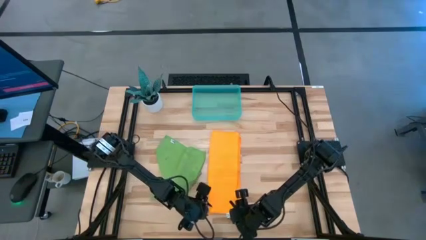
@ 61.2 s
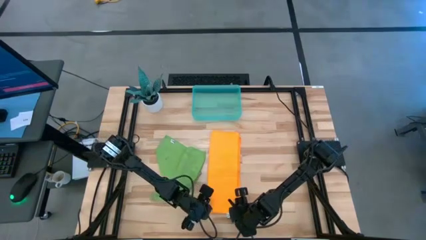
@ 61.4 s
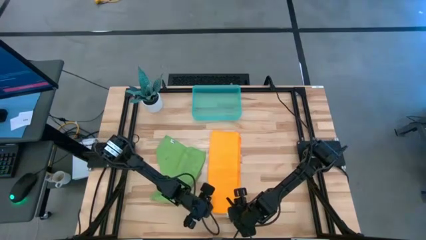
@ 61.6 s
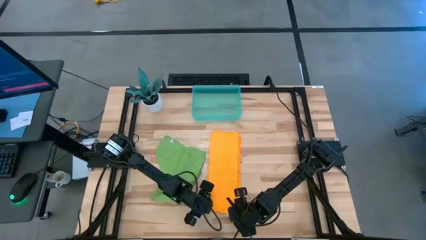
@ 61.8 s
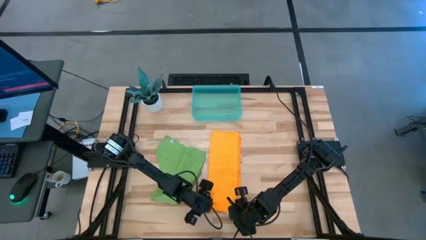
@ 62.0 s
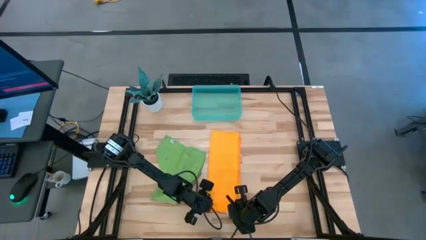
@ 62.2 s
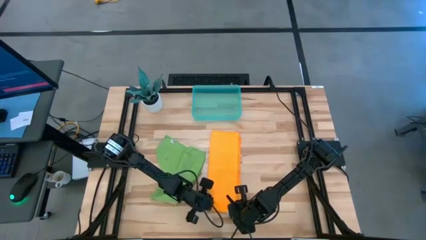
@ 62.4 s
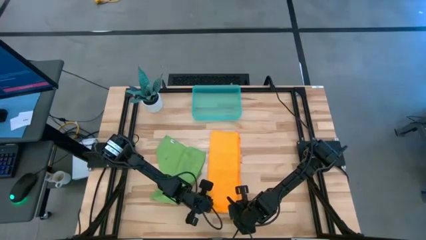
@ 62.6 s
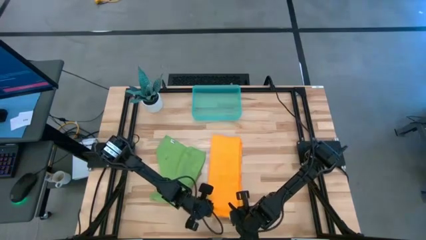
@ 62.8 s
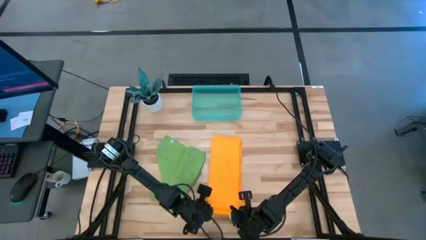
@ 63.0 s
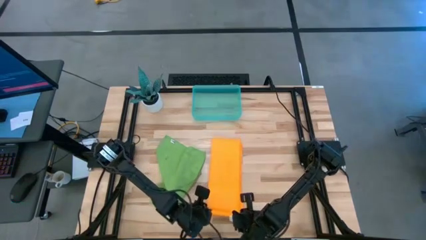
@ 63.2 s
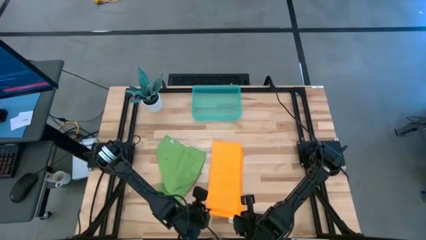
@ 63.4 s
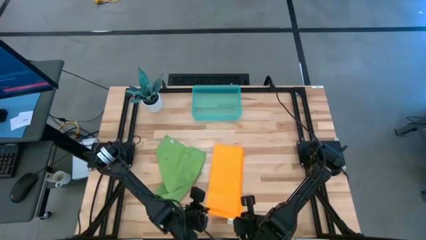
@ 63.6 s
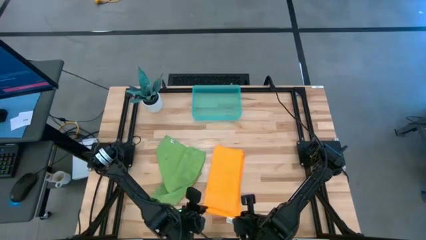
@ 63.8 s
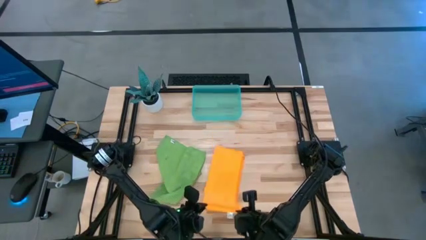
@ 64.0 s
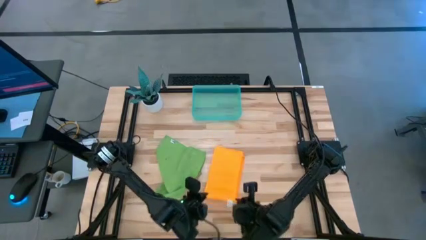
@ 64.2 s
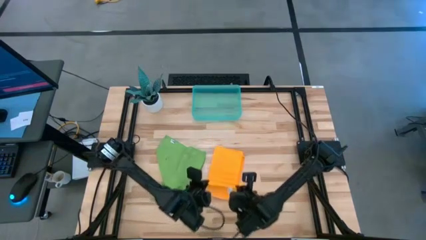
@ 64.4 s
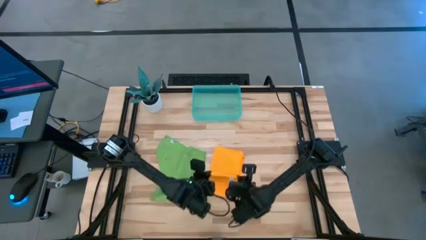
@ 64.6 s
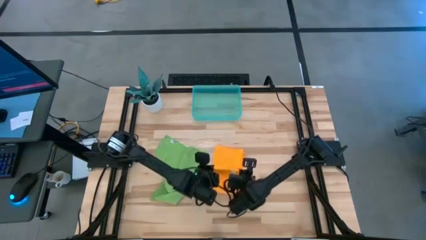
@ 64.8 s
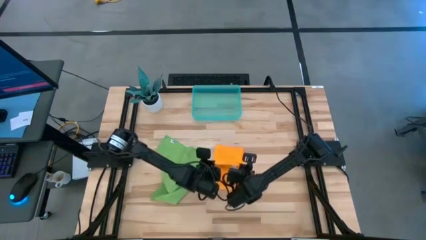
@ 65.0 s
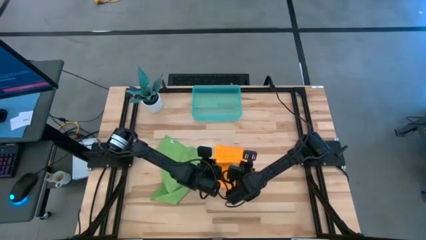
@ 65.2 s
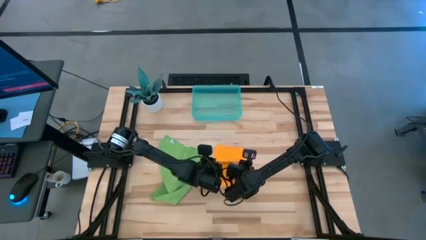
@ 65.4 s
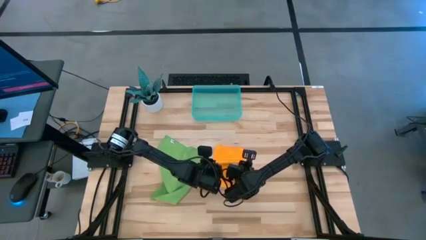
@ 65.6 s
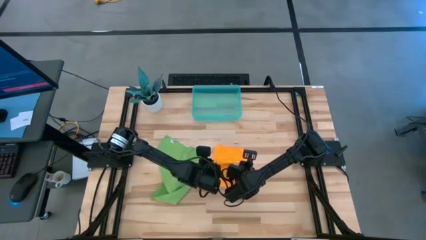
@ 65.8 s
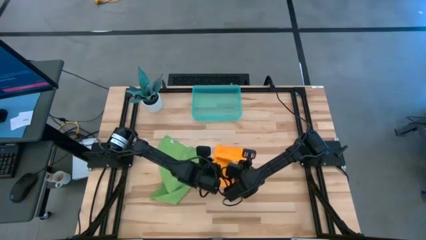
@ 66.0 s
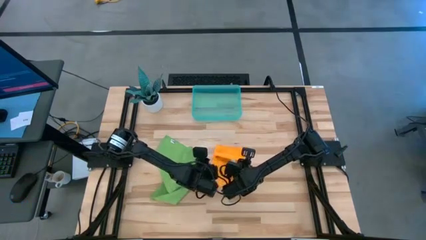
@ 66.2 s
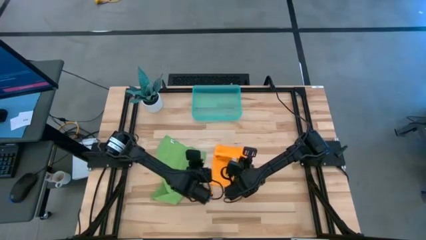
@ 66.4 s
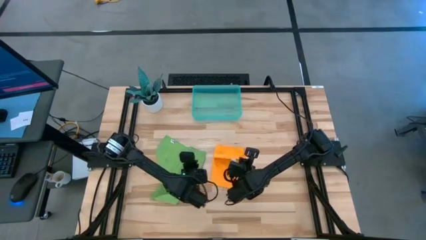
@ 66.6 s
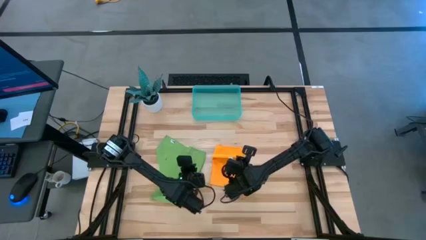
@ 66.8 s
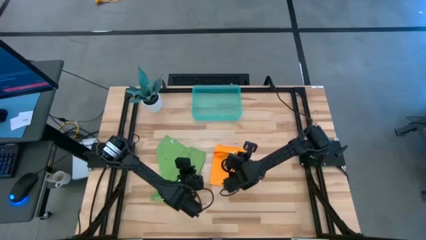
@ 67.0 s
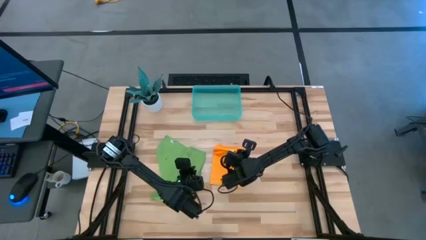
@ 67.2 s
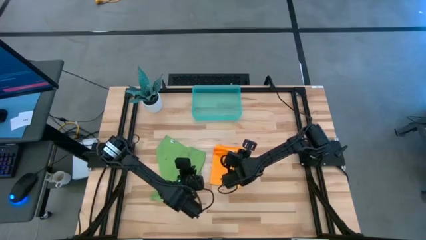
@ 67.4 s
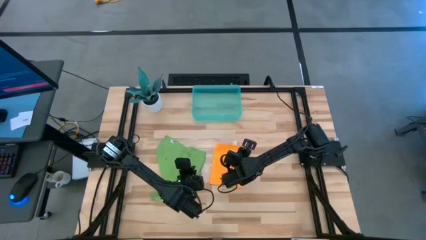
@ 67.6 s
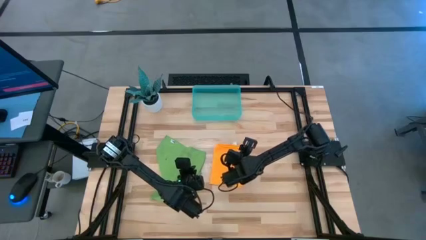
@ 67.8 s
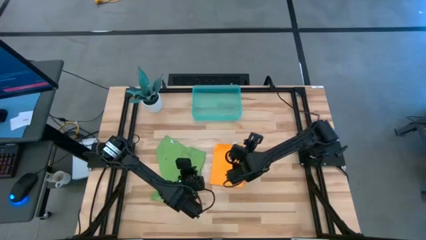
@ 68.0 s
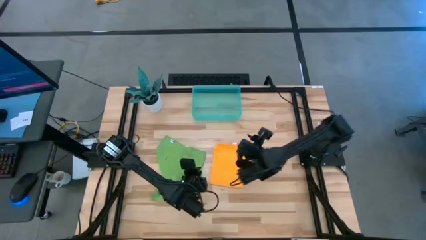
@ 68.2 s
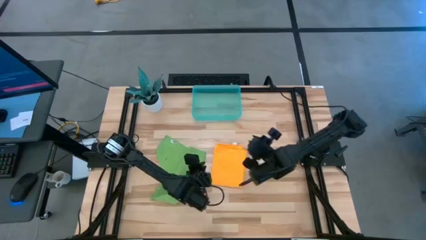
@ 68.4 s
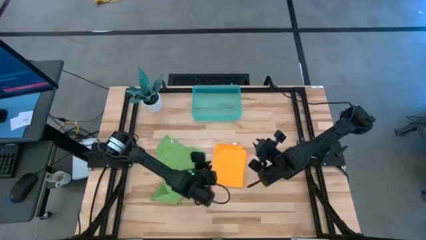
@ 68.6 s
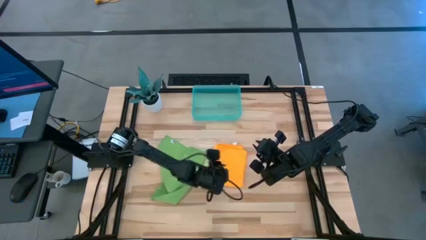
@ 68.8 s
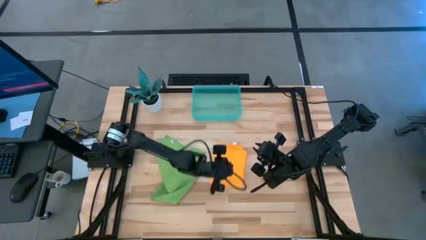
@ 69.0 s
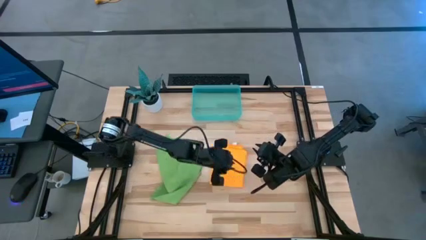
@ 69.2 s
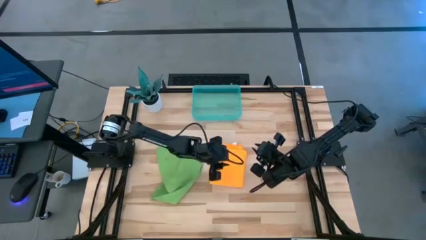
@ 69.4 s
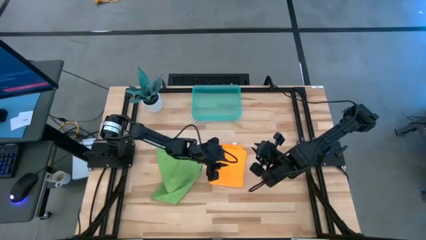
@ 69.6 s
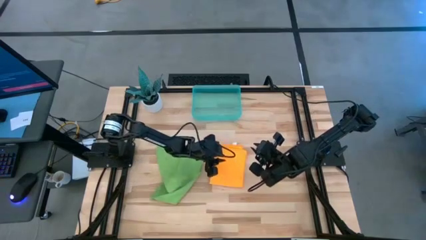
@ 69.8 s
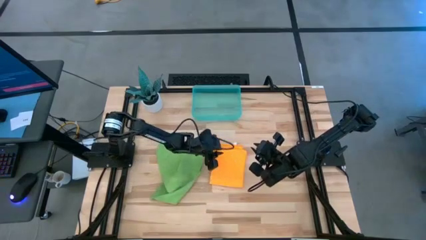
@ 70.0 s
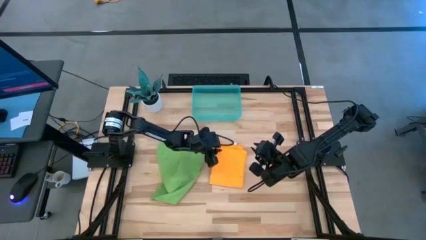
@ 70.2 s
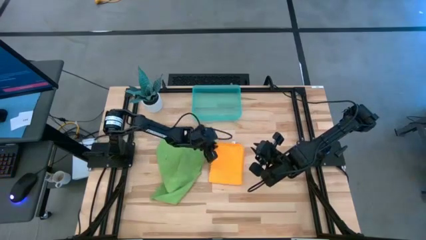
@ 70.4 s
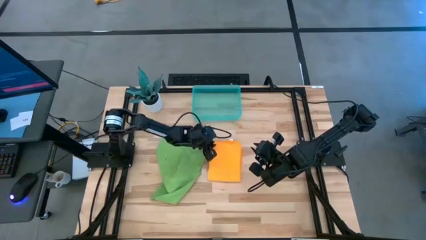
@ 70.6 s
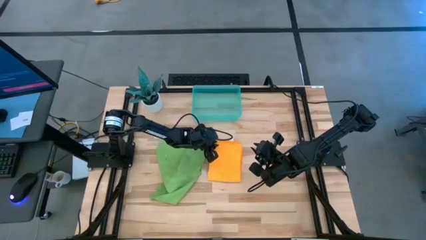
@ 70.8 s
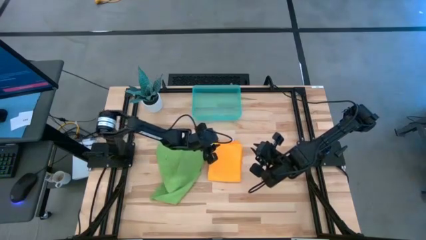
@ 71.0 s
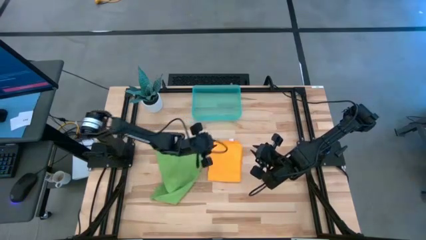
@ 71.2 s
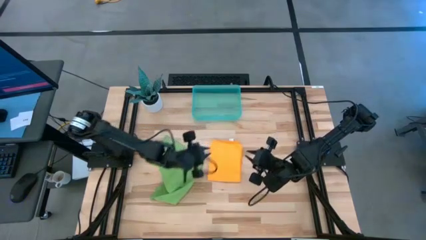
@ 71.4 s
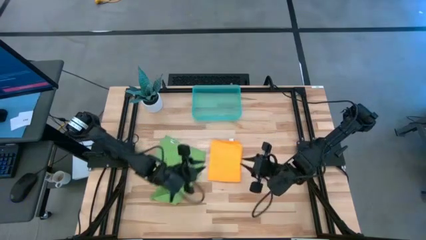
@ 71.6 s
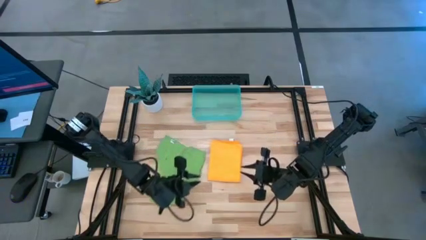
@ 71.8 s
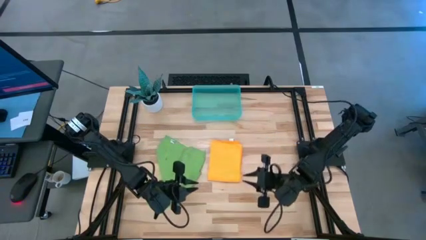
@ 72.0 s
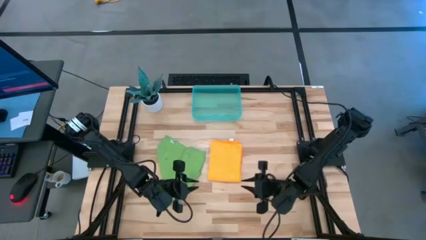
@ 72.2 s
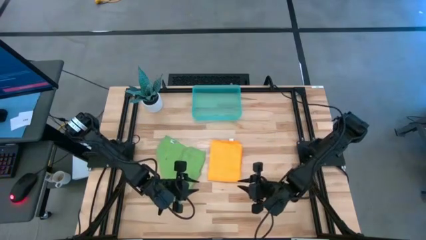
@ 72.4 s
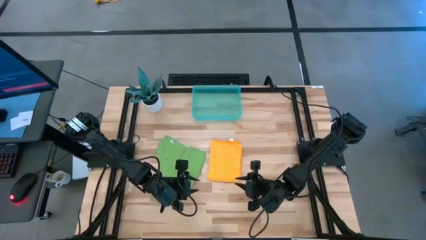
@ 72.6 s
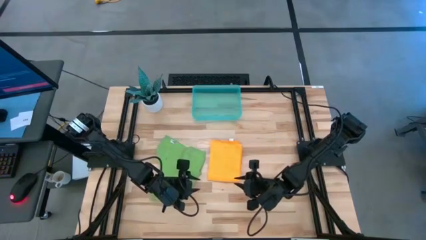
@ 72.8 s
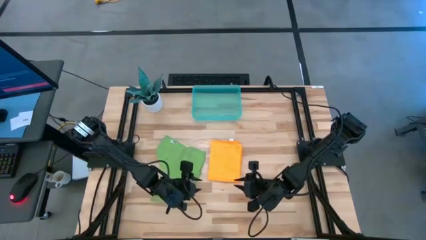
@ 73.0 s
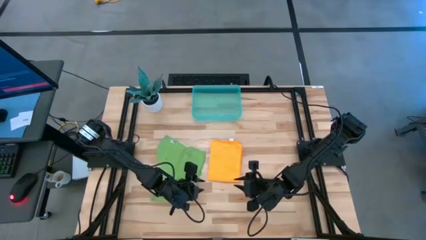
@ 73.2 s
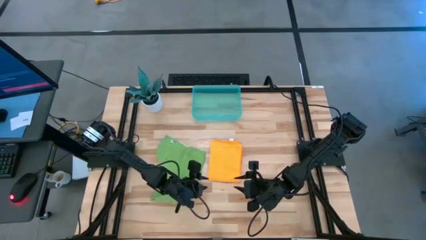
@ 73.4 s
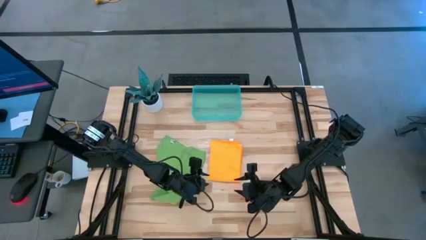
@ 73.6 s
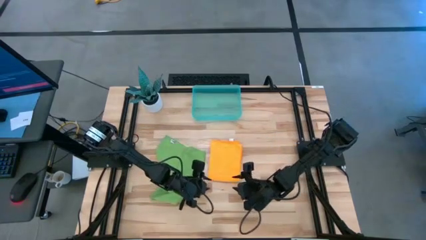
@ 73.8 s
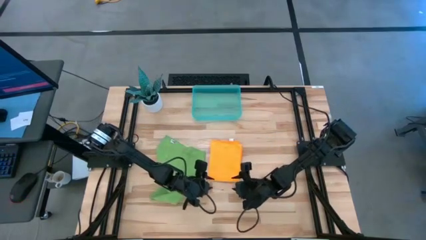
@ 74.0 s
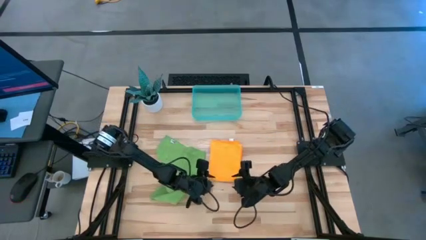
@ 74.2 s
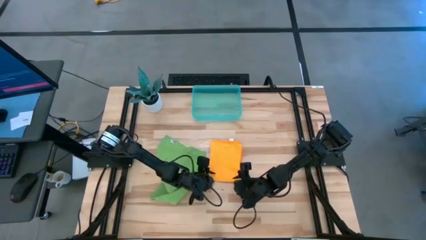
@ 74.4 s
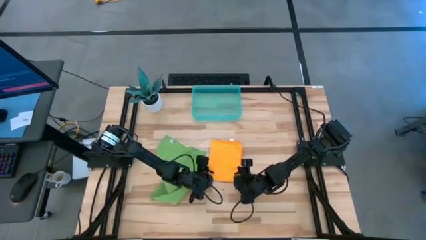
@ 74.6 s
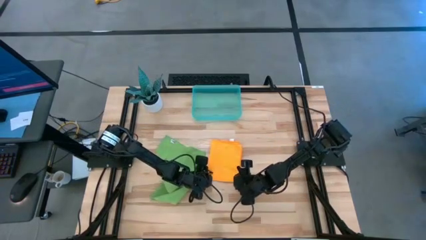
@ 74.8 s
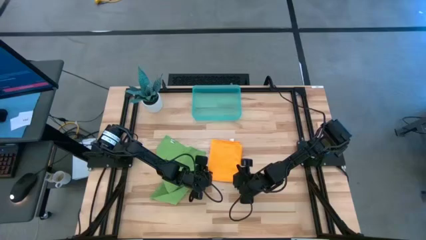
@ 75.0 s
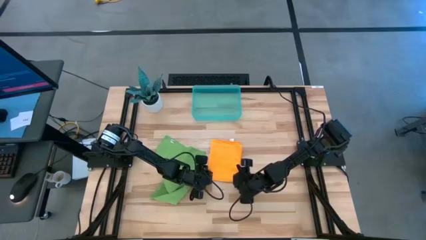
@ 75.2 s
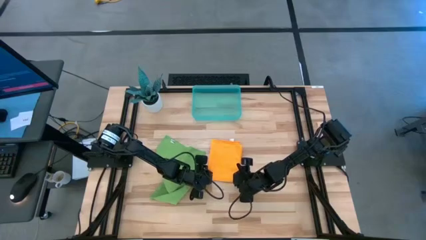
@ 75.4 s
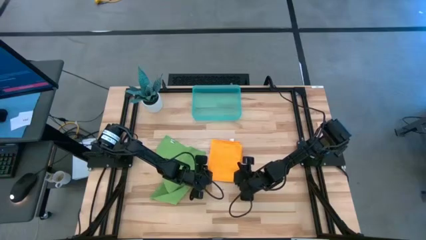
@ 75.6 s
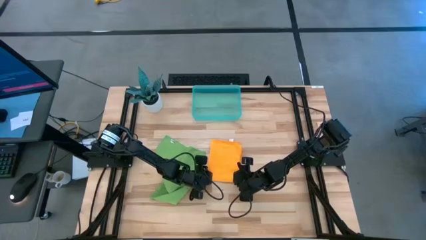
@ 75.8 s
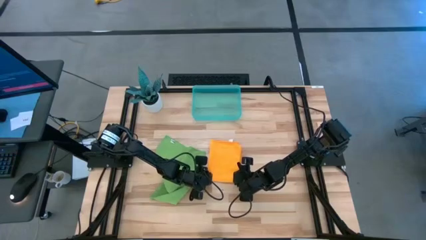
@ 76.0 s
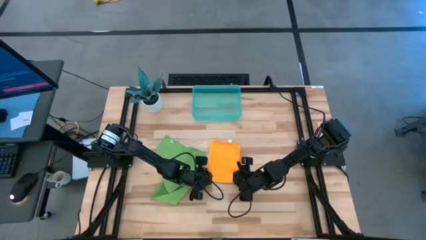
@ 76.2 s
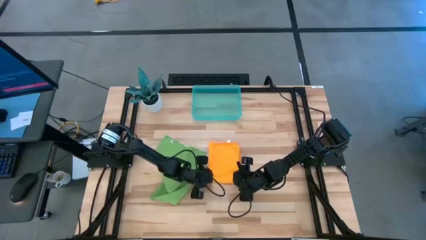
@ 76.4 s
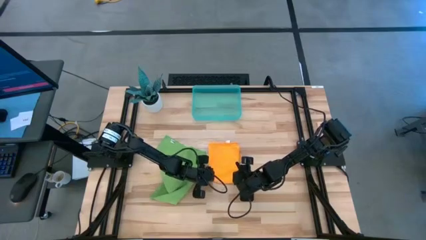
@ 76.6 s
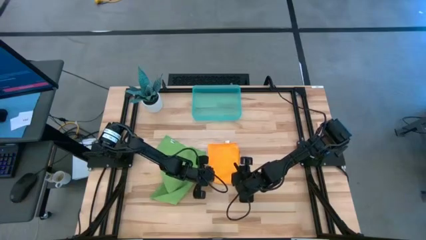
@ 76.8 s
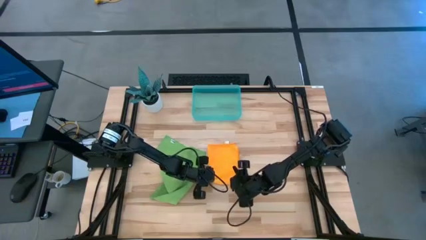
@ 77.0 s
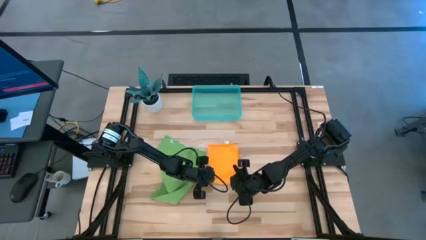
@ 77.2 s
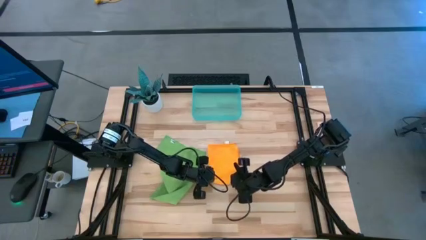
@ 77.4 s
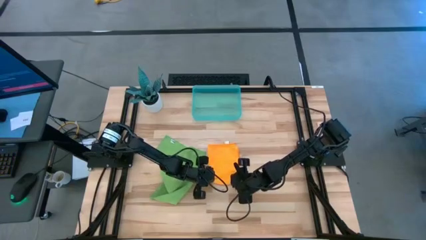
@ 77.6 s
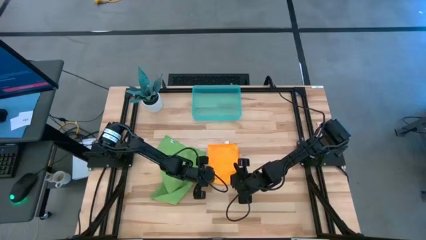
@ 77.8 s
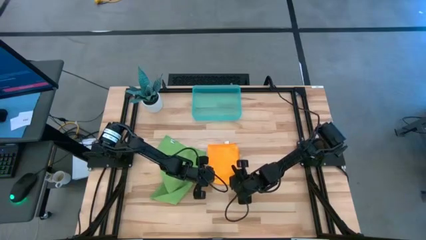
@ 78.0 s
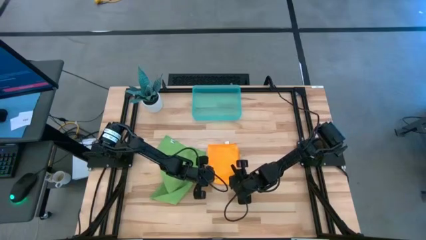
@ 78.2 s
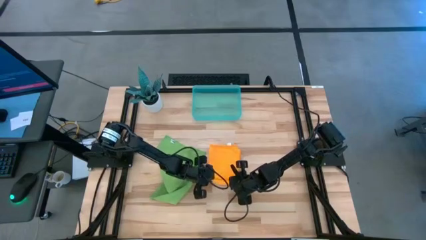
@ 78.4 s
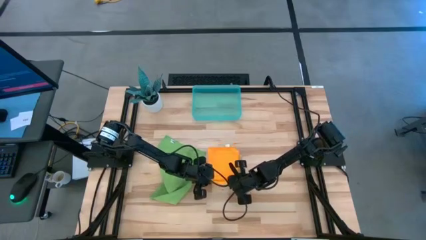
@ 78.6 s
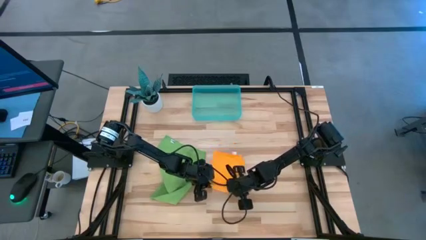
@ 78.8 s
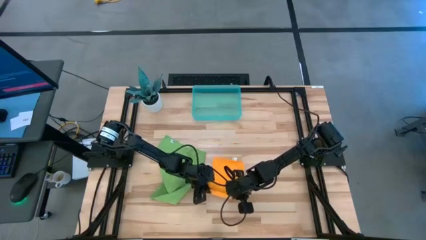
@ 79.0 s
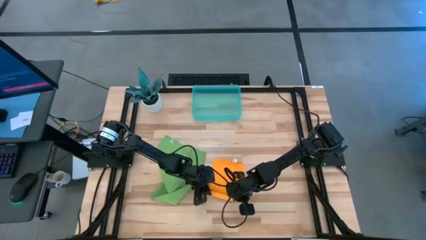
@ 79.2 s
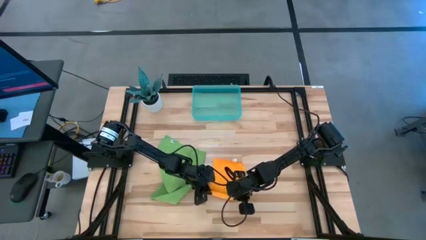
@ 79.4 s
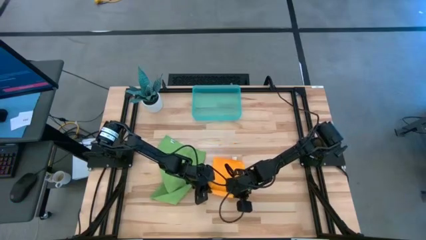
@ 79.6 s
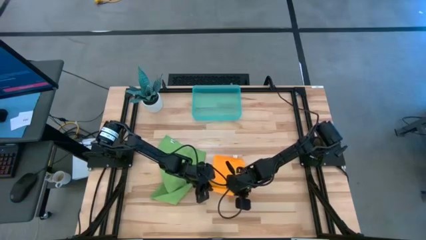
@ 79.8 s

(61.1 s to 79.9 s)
Task: Roll microfiber towels into tight, uniform cylinder then place into a basket
Roll the orange microfiber cloth
